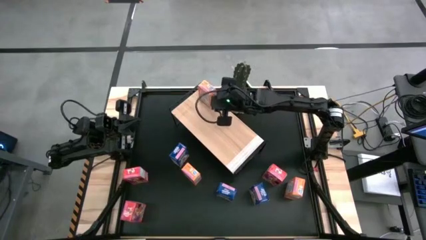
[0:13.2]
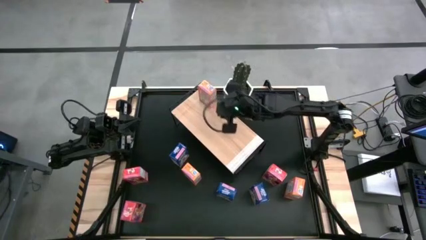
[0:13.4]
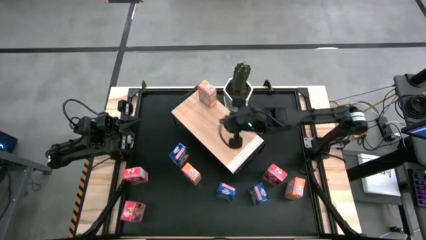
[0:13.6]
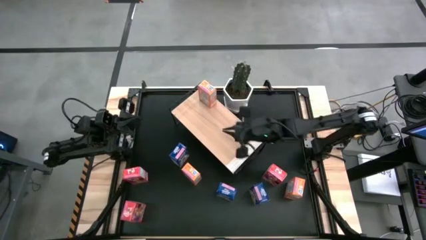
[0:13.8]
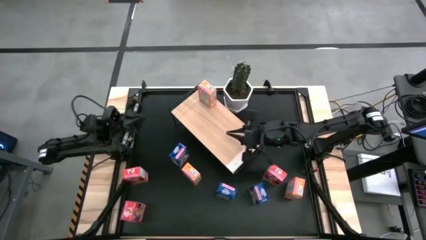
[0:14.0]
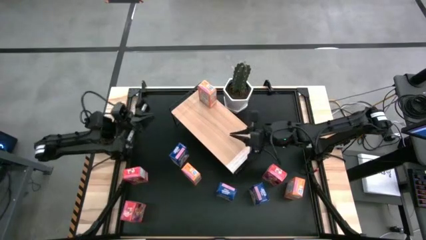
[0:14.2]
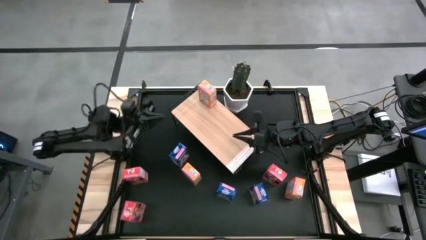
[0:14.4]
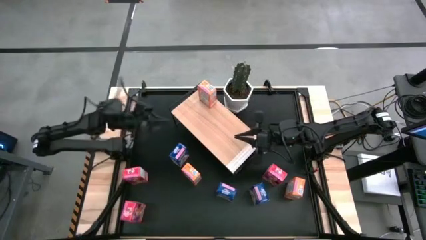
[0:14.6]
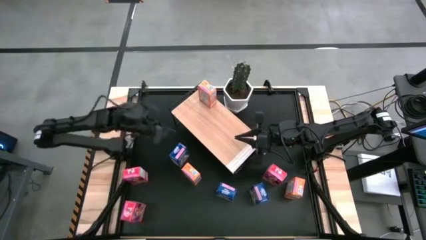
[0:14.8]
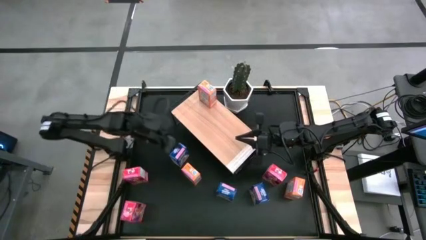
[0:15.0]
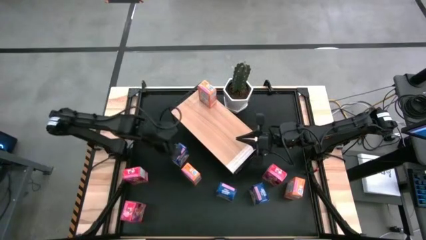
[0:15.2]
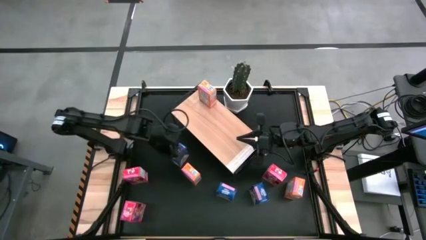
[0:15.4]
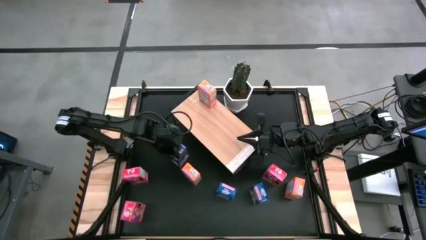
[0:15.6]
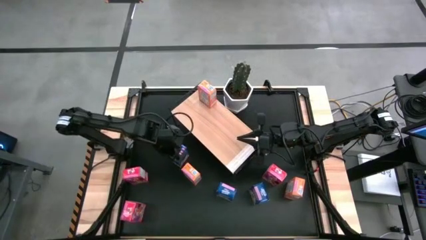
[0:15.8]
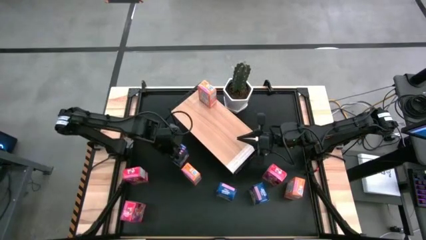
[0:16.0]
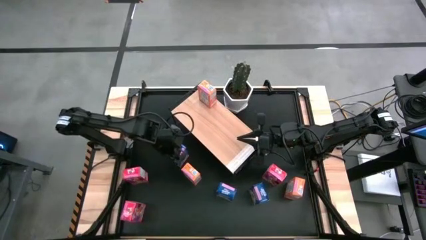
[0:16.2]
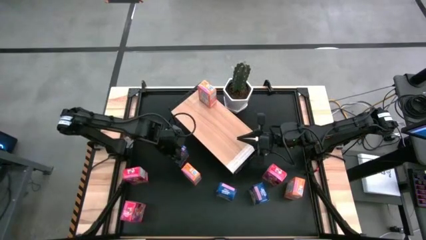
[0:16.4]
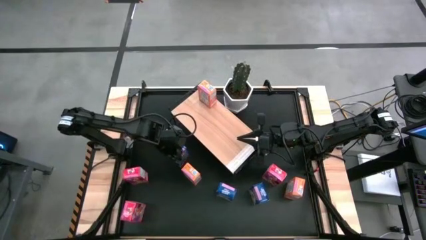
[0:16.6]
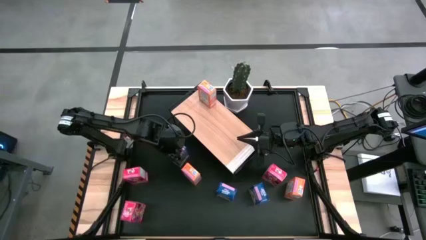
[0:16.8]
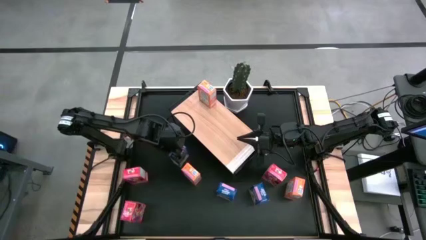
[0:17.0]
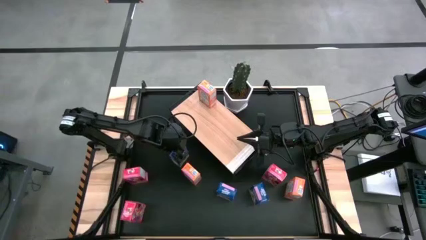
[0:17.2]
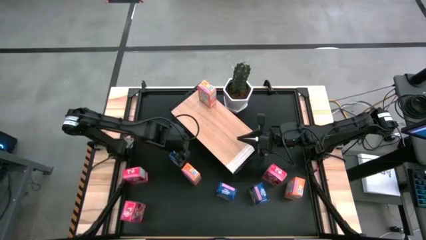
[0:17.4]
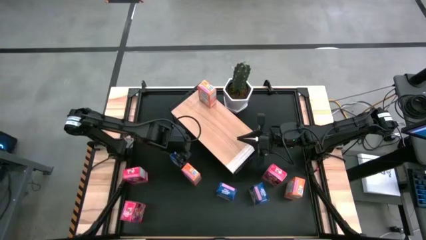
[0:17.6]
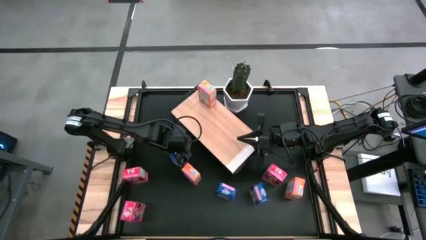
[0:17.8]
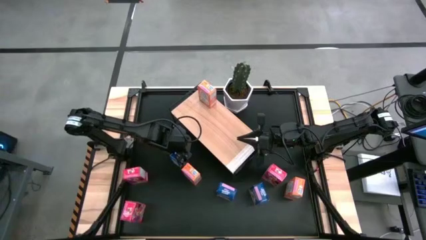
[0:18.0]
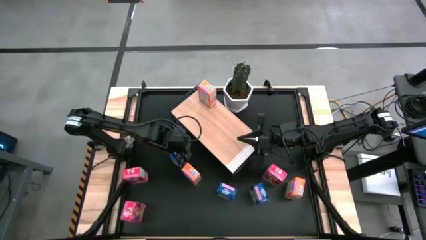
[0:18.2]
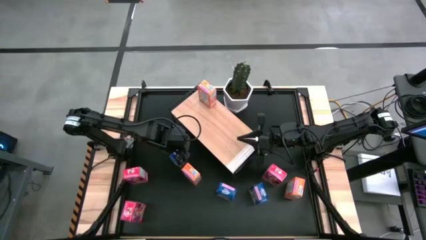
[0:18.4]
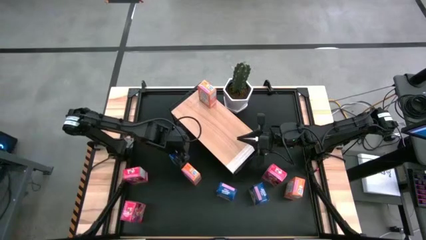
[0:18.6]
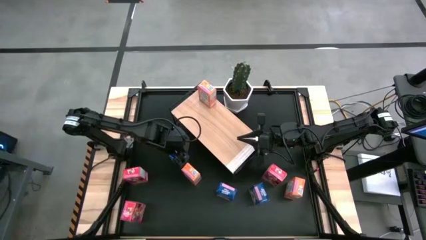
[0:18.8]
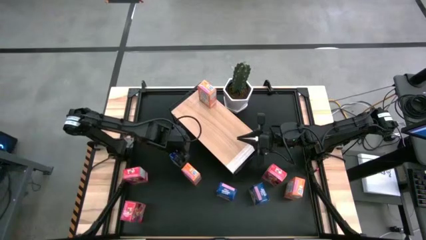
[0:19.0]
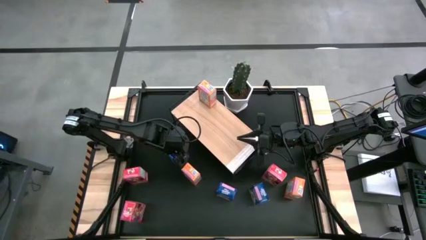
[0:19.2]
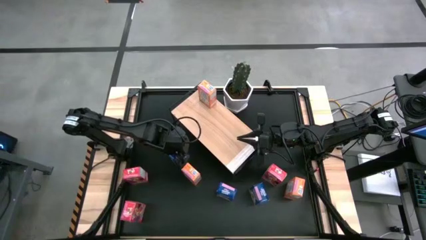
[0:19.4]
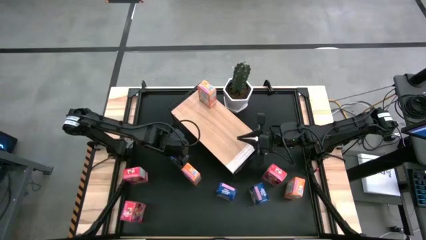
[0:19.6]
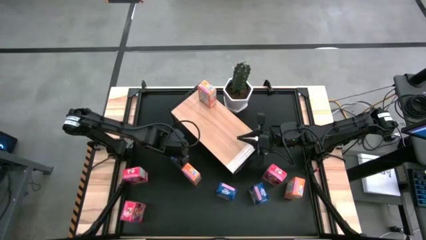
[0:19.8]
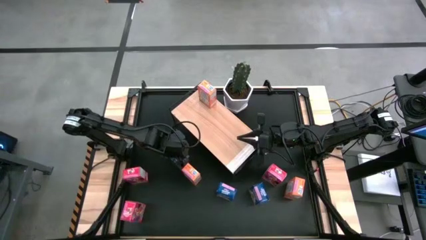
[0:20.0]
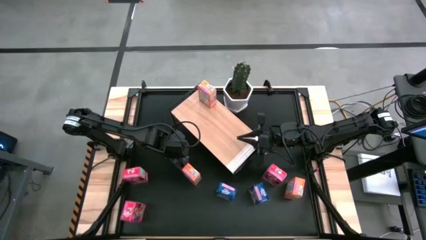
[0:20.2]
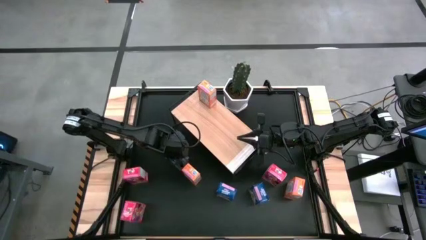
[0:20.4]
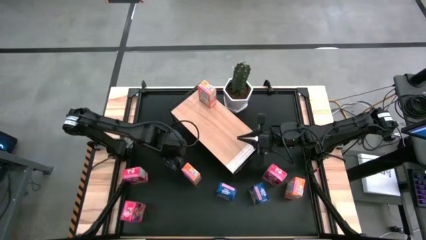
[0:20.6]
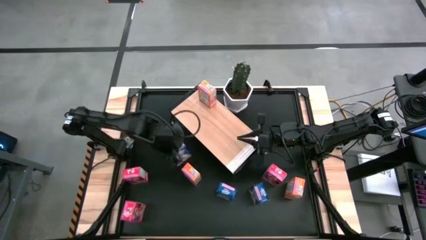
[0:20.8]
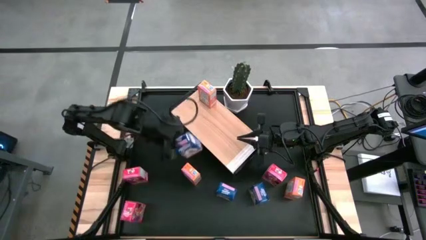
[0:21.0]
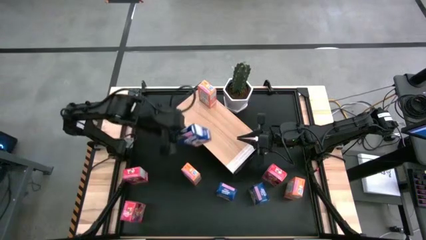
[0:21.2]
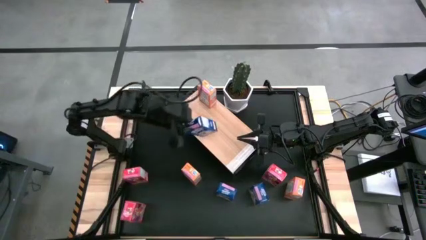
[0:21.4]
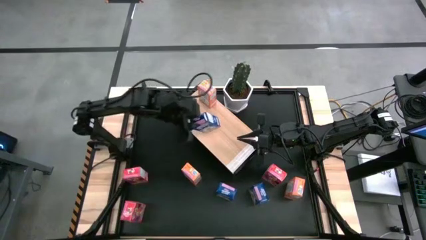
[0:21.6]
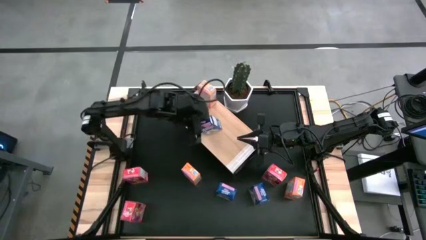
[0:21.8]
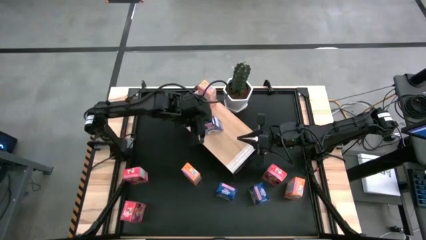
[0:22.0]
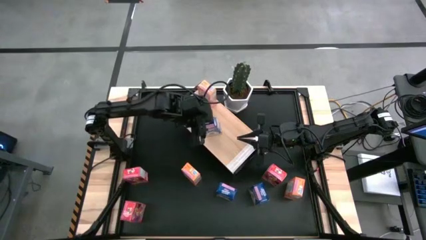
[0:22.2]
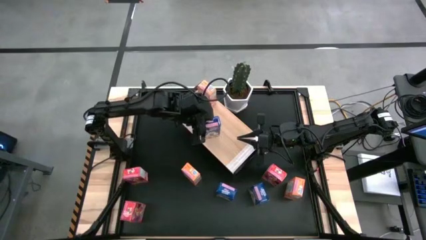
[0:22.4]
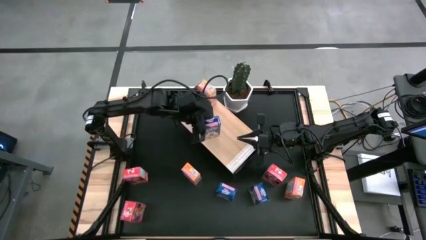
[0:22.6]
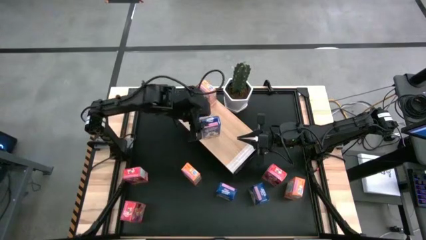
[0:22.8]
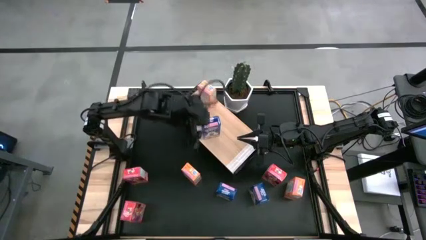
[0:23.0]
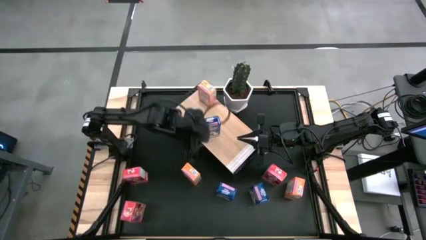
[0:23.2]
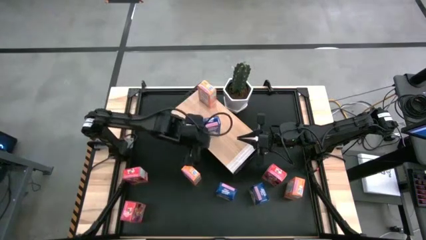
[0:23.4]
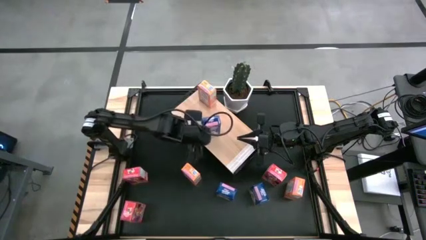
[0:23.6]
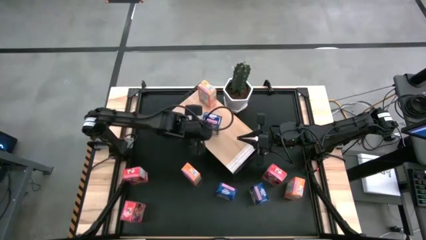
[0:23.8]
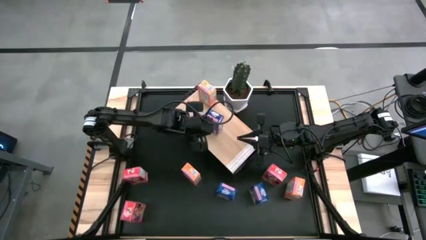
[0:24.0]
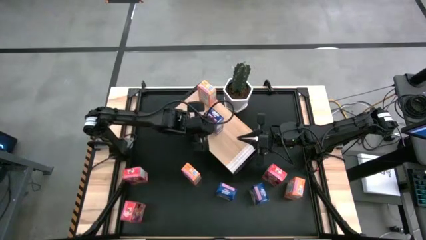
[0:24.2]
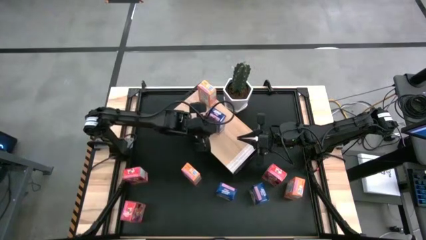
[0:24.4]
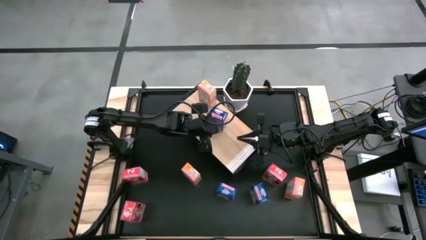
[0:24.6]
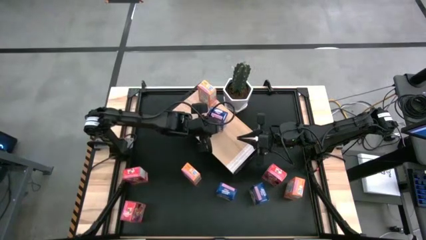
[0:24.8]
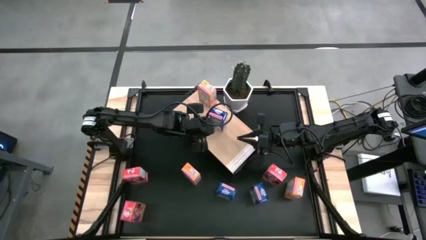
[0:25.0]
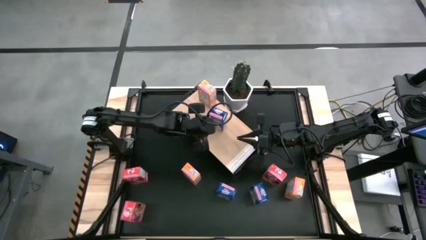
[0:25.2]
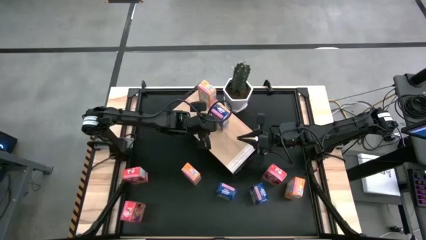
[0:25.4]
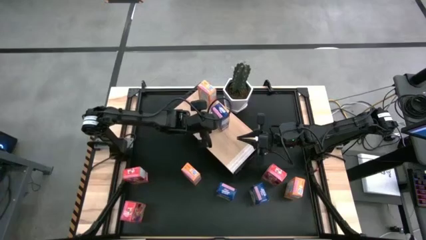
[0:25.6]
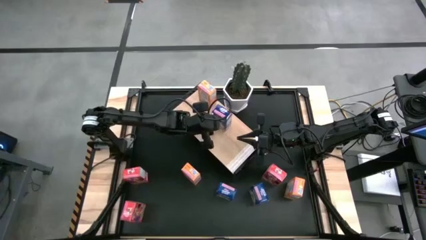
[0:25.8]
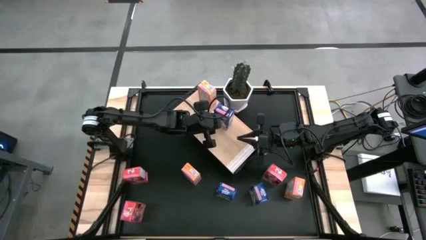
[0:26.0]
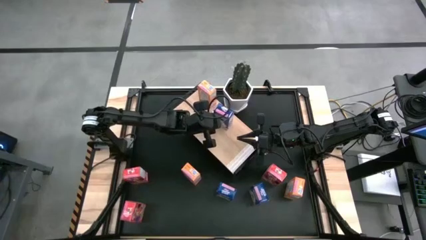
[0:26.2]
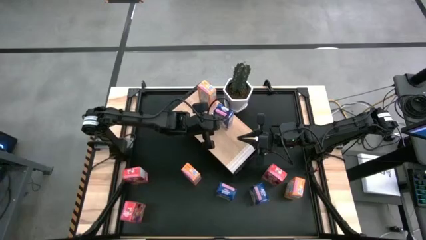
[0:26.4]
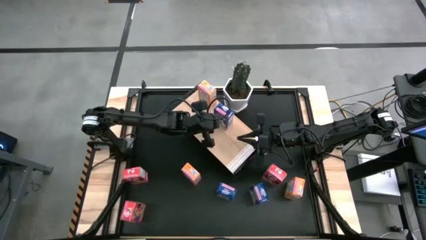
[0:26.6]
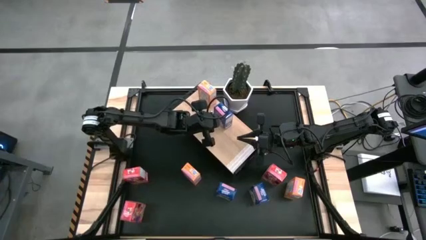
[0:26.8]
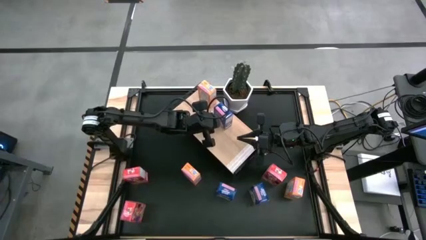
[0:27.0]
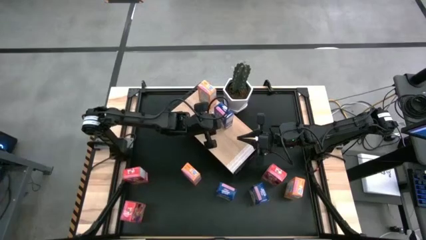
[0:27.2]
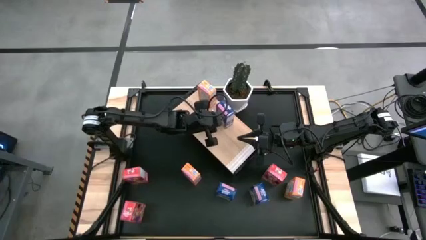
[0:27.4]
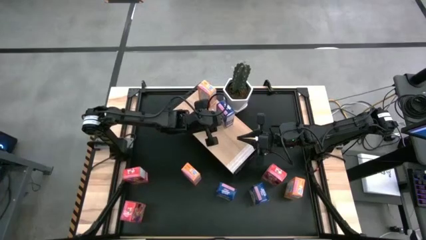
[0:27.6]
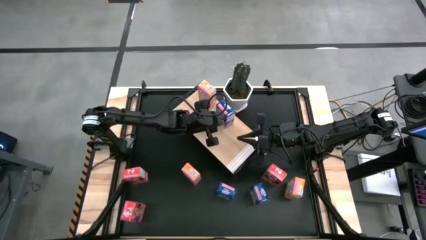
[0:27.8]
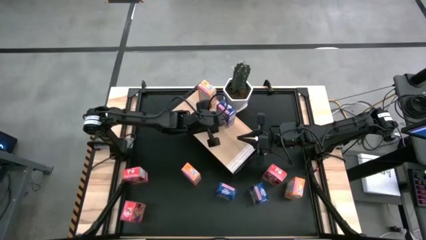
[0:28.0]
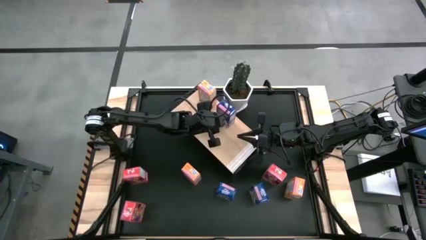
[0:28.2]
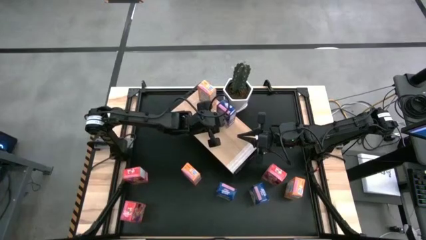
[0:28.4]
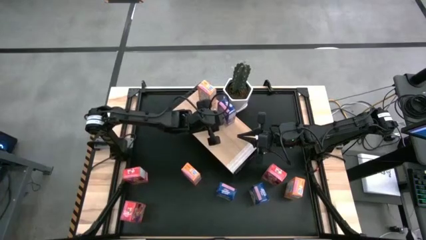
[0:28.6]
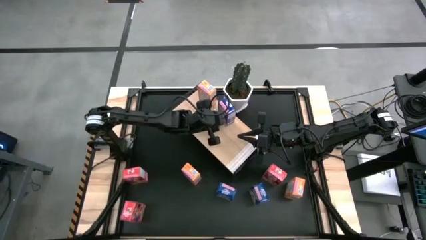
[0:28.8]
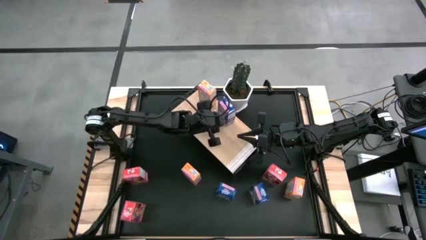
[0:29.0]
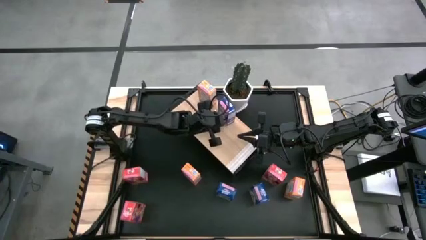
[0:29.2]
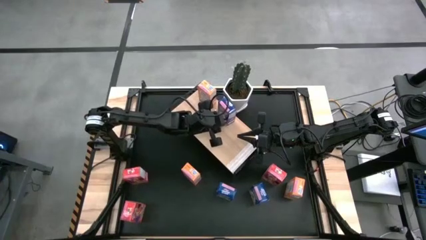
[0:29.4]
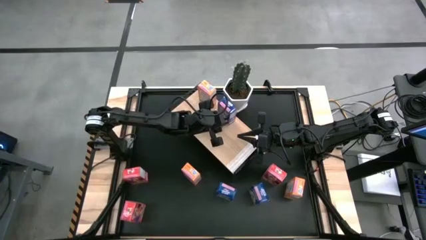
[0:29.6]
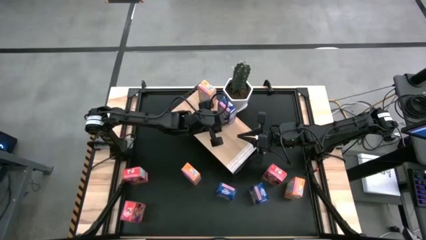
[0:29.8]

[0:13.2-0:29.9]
Task: Stack cereal on shelf
Put the top blue cereal box on the shelf
